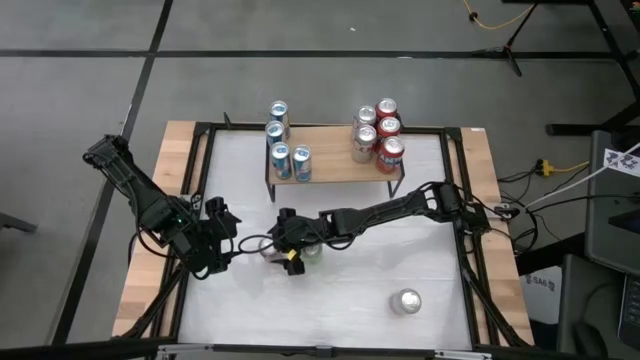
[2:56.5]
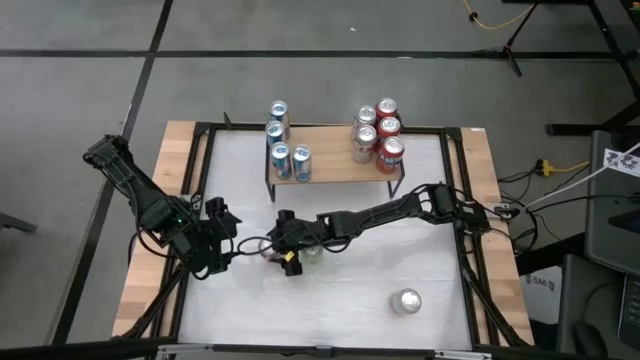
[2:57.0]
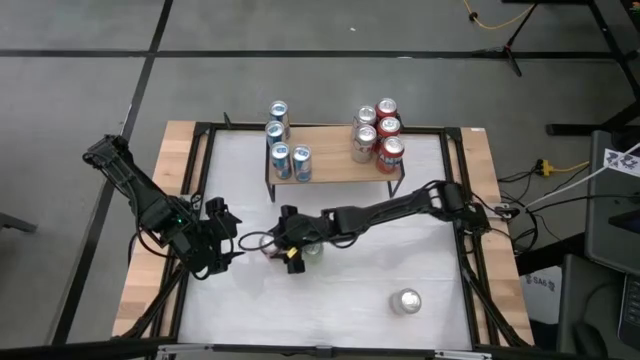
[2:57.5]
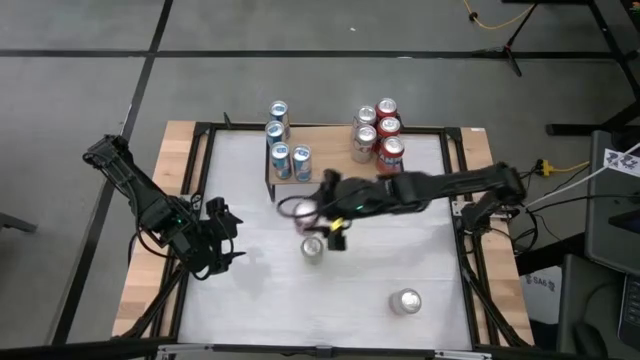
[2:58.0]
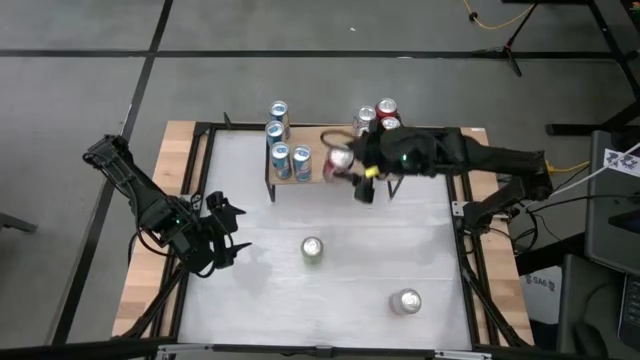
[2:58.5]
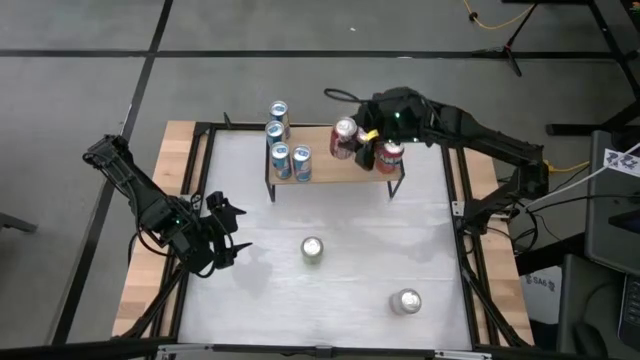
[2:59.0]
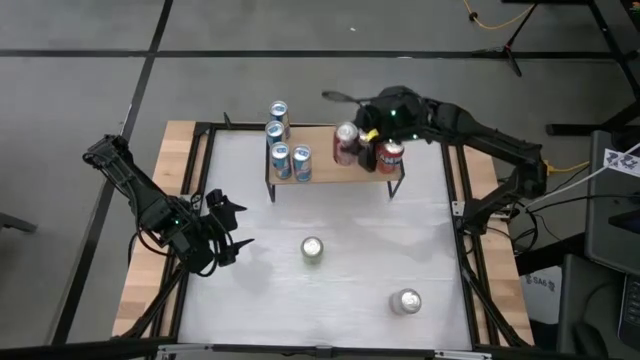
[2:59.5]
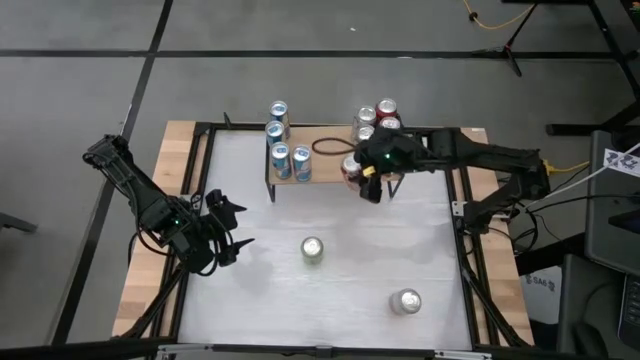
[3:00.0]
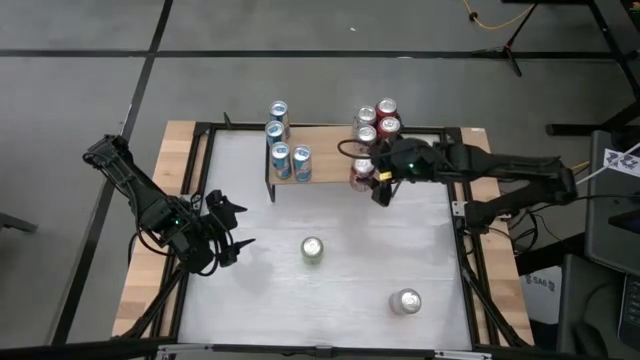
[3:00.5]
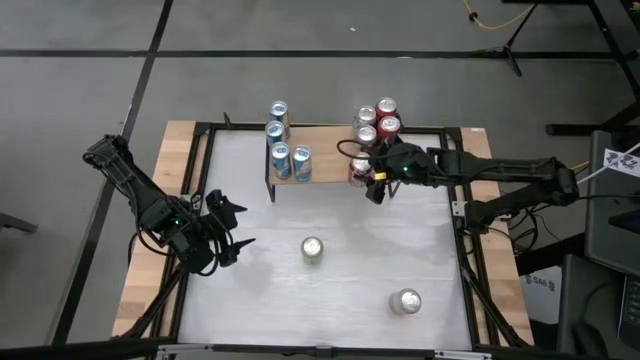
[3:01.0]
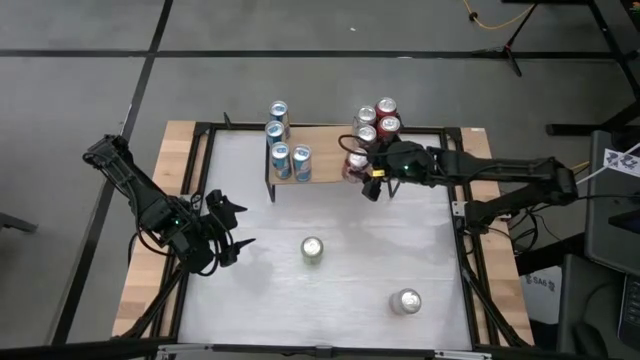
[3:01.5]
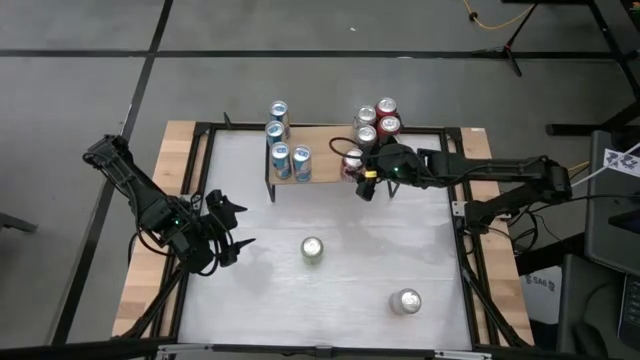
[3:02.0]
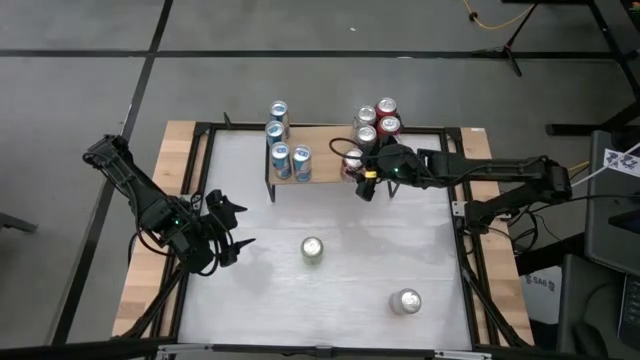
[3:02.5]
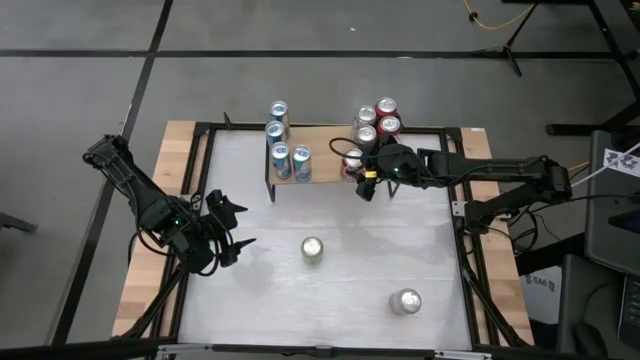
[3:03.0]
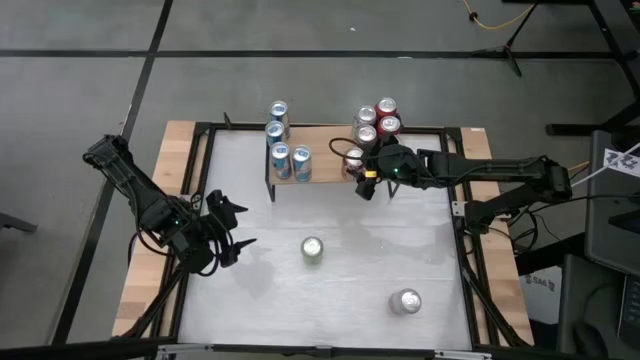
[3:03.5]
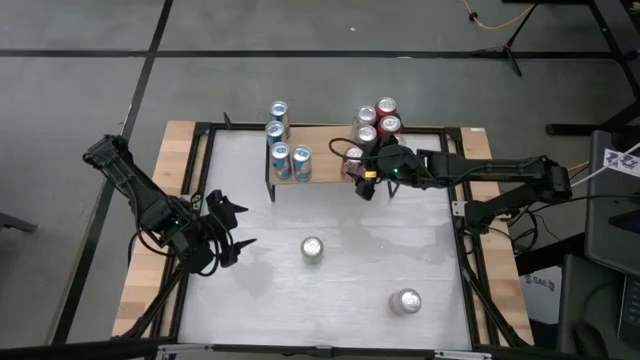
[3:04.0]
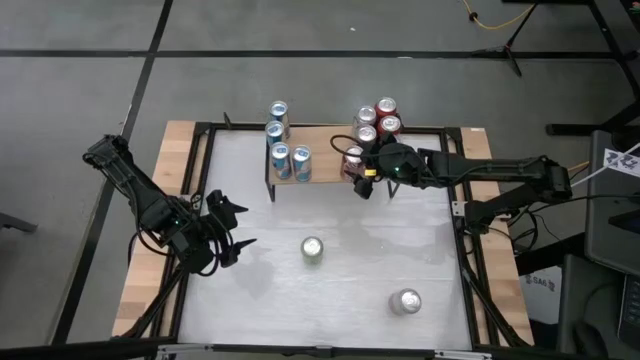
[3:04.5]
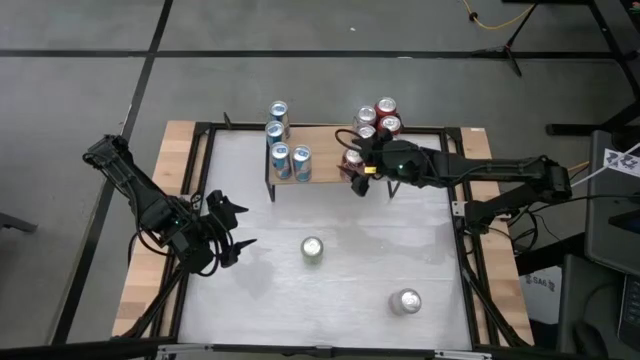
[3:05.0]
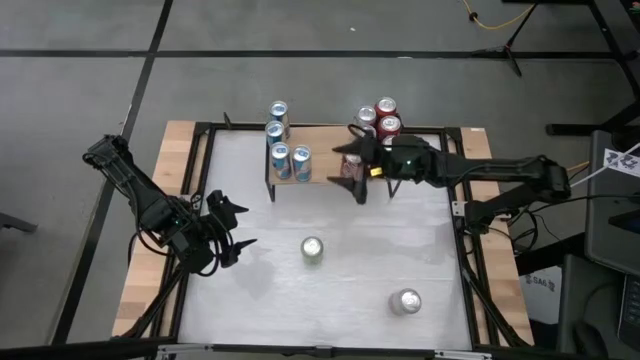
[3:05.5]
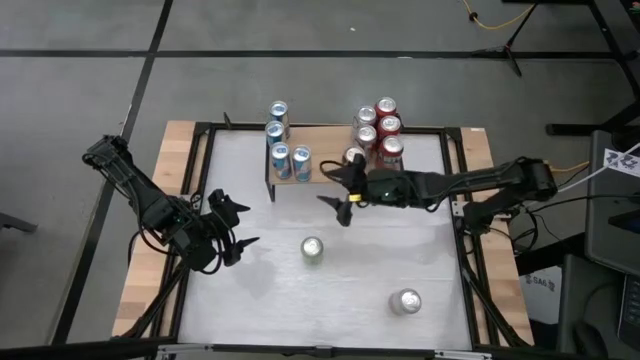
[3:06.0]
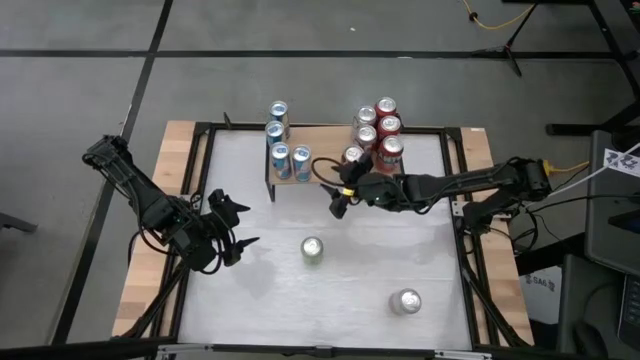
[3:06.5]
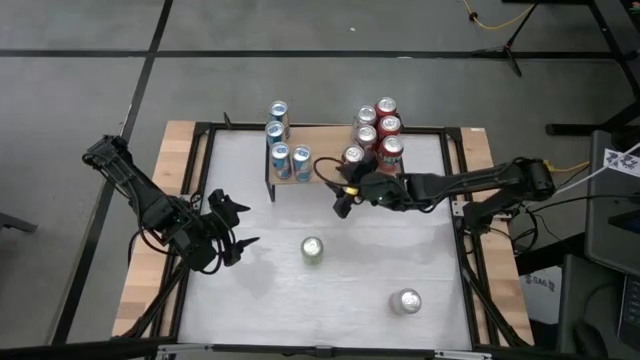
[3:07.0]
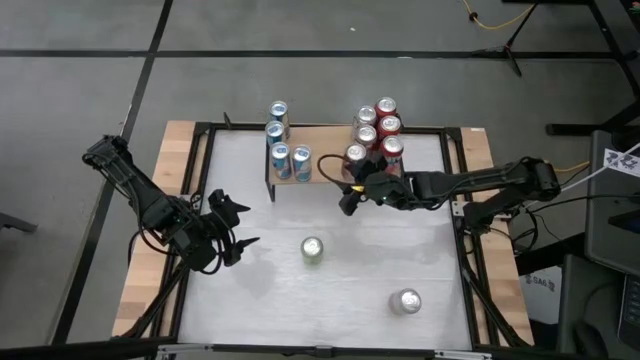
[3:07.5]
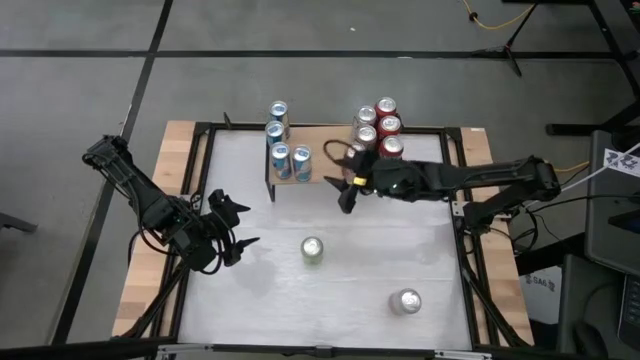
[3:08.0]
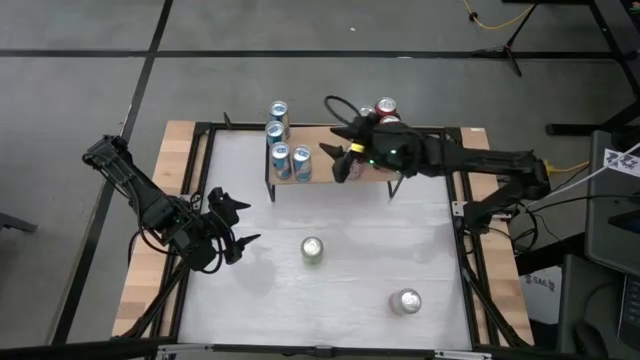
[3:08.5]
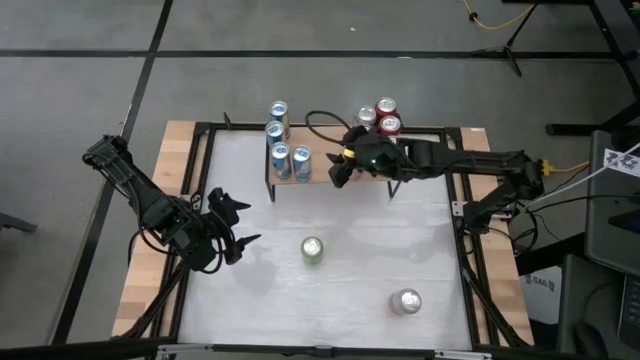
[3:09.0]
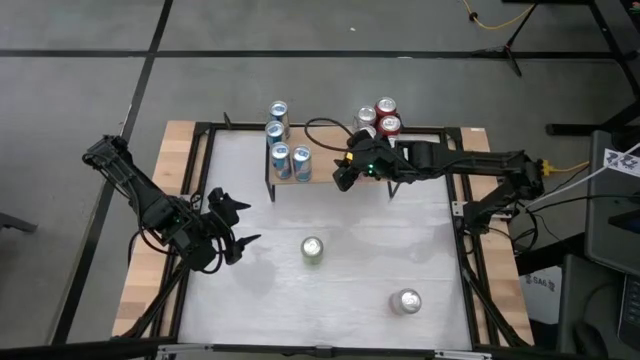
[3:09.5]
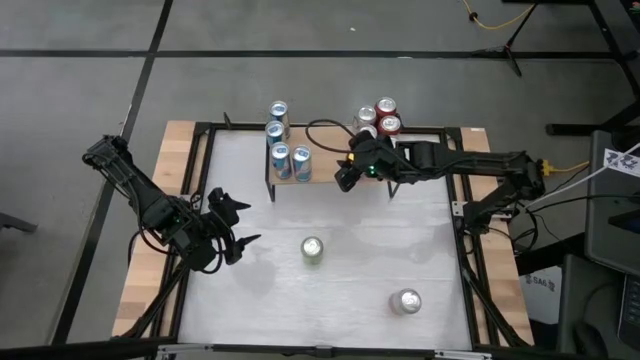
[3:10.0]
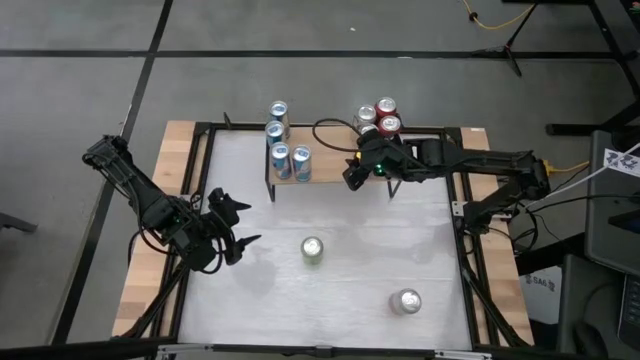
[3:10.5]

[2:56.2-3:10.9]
Task: Sort soda cans
Put the red-white soda can on the shelf aligned with the red-silver soda cans

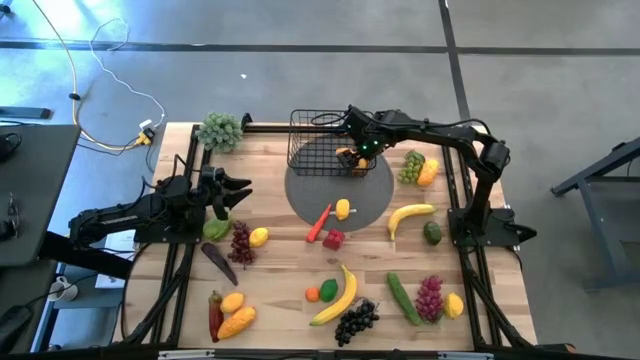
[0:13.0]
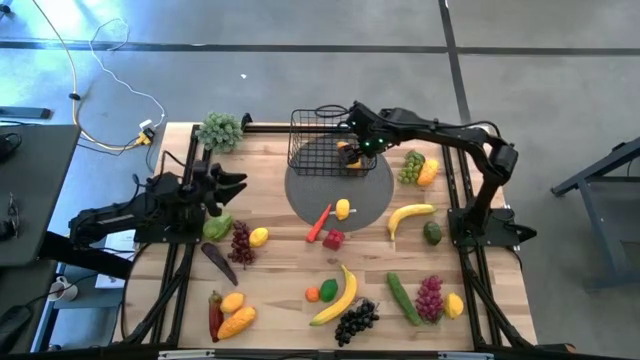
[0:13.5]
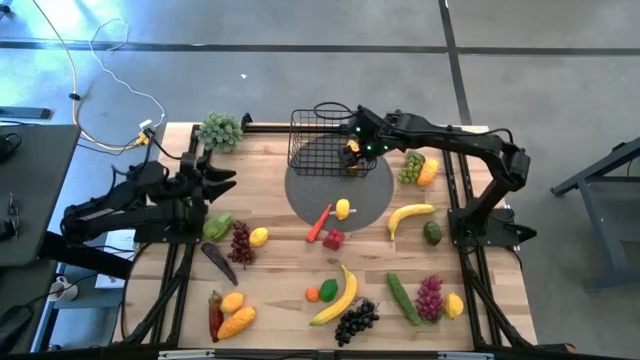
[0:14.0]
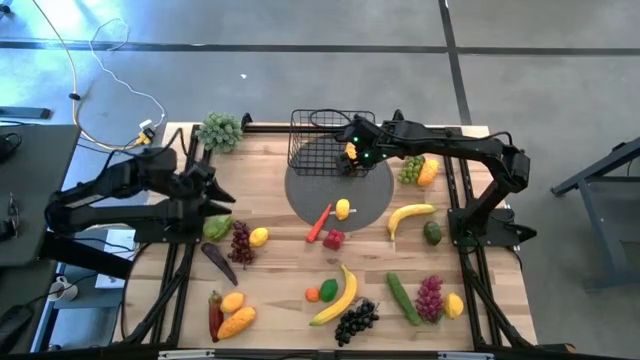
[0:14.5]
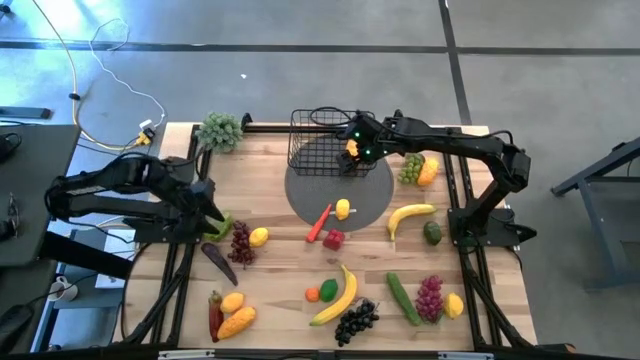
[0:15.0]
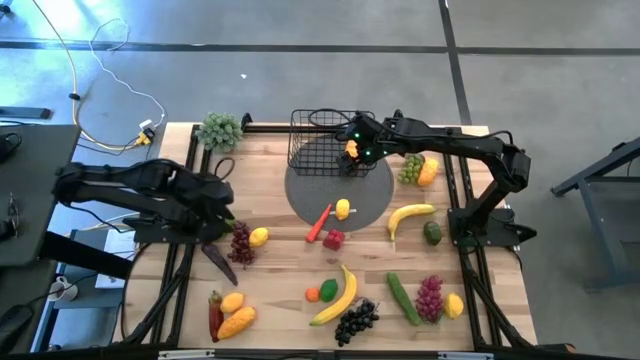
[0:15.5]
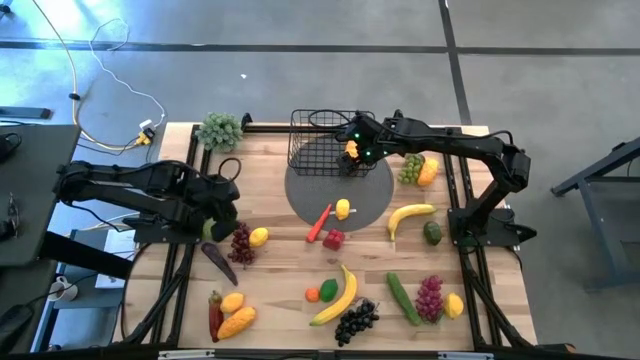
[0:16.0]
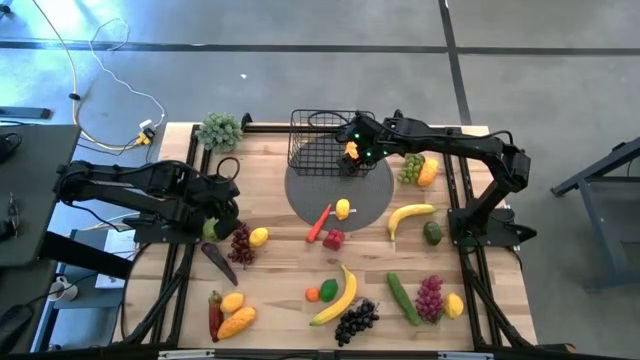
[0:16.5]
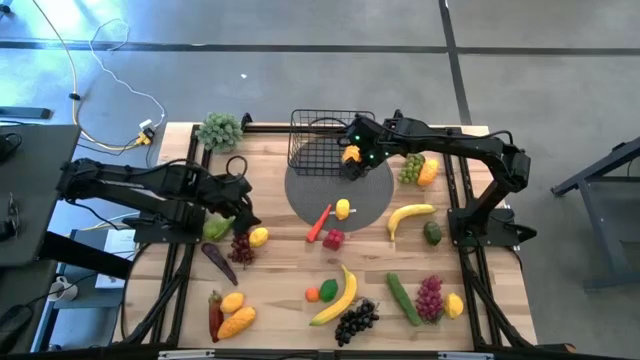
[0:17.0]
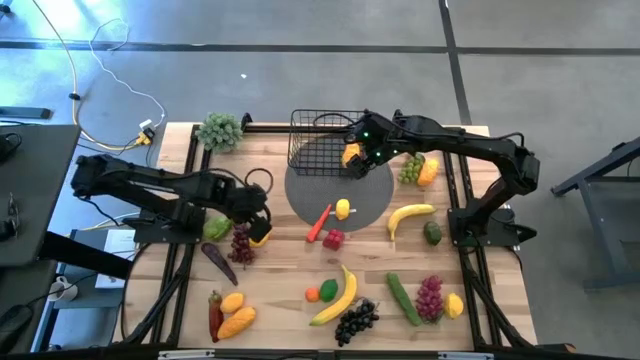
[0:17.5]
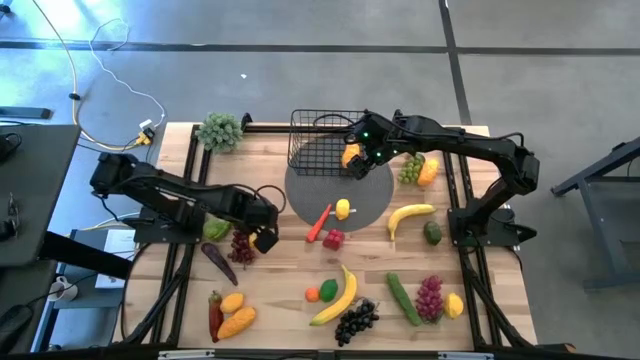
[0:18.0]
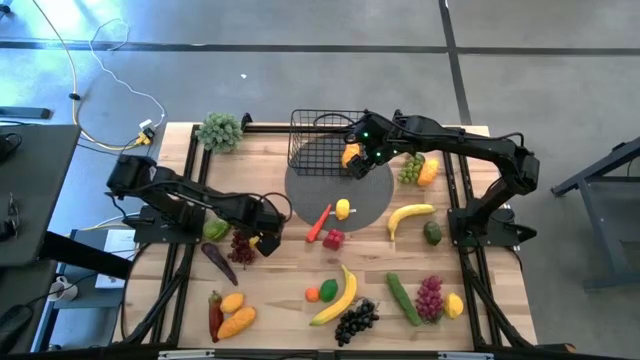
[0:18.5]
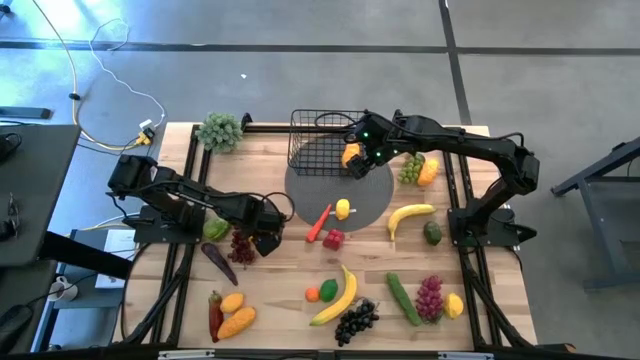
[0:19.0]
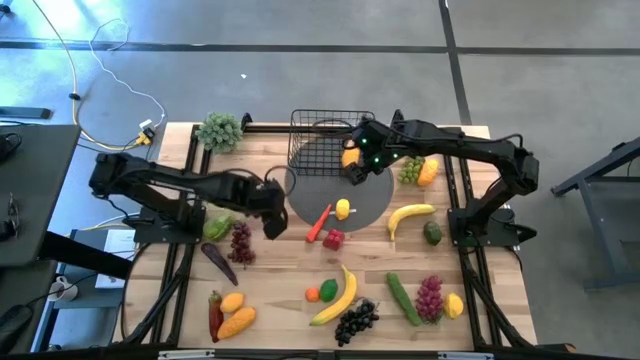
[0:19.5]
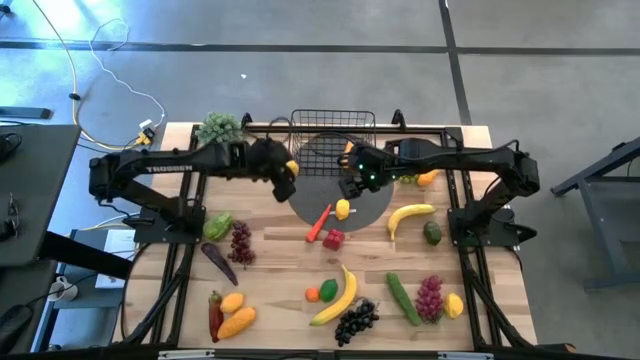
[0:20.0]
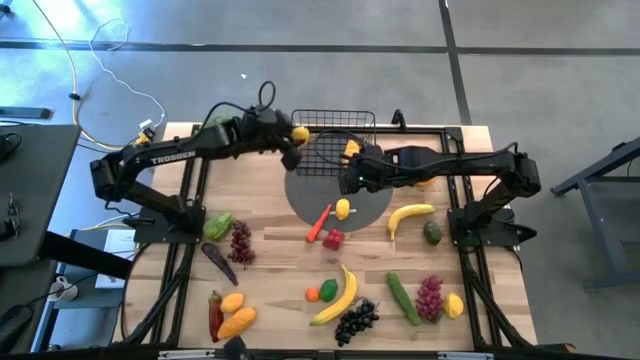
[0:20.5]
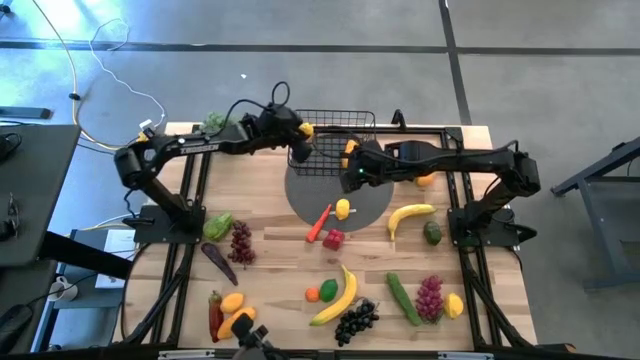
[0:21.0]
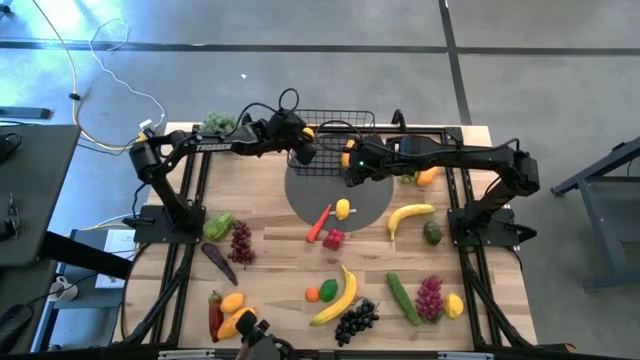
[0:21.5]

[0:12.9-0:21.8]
Task: Build produce basket
Put the yellow lemon into the wire basket
